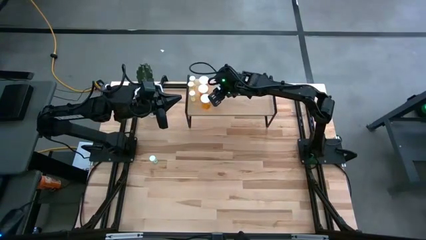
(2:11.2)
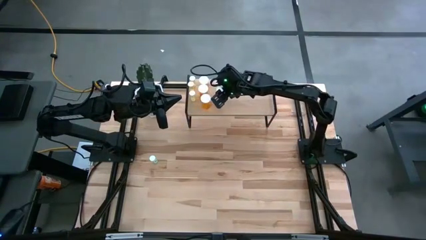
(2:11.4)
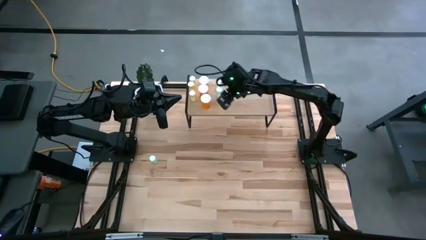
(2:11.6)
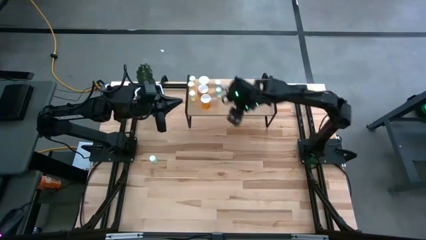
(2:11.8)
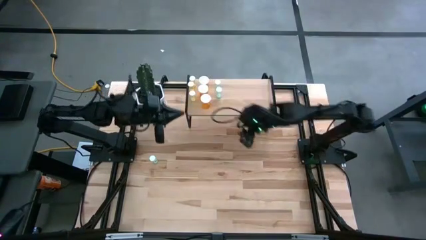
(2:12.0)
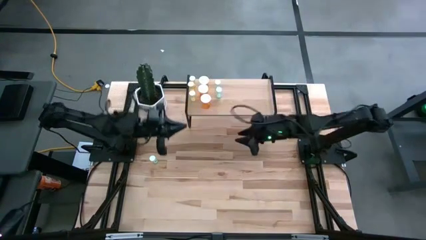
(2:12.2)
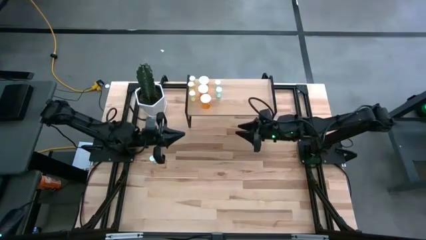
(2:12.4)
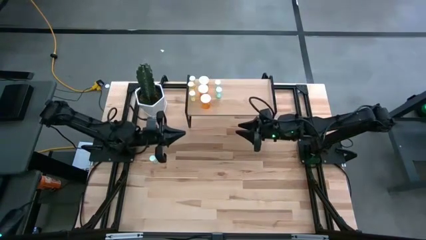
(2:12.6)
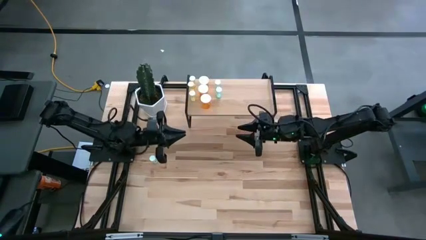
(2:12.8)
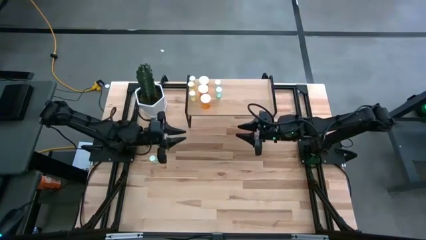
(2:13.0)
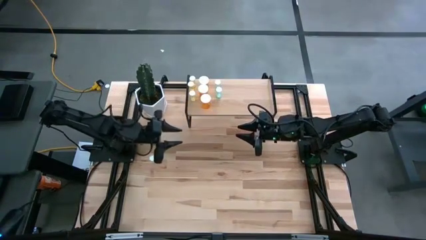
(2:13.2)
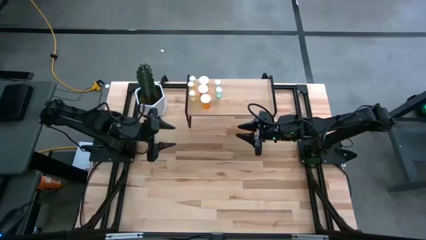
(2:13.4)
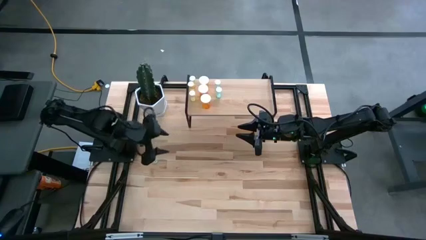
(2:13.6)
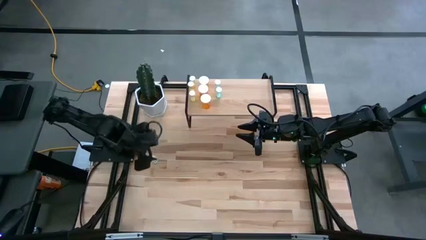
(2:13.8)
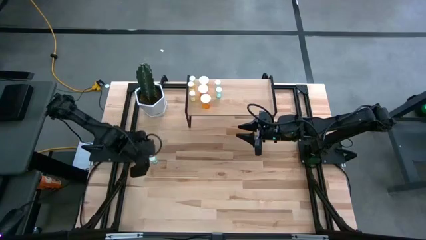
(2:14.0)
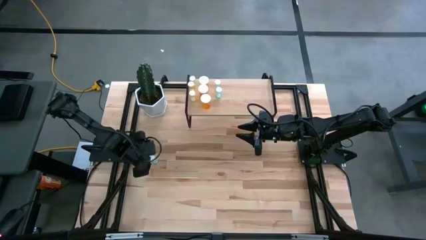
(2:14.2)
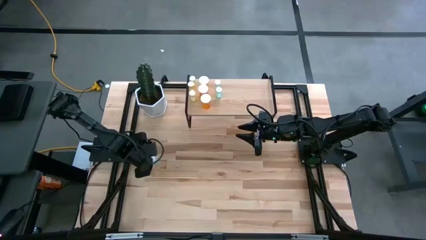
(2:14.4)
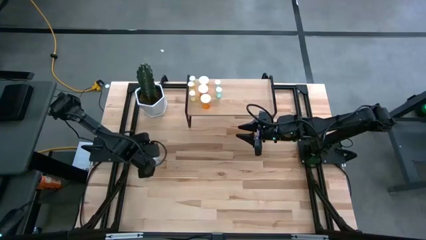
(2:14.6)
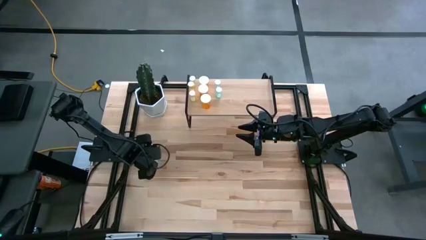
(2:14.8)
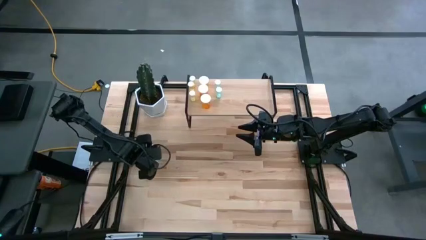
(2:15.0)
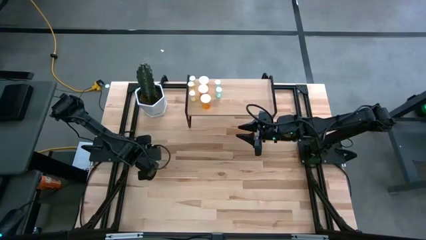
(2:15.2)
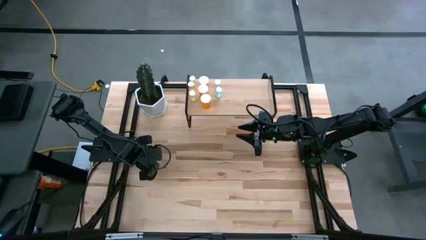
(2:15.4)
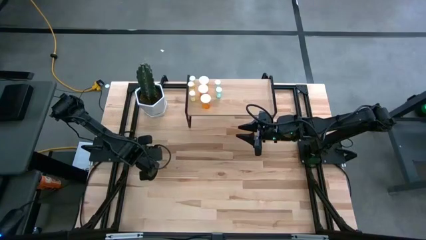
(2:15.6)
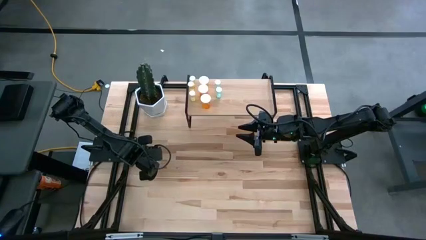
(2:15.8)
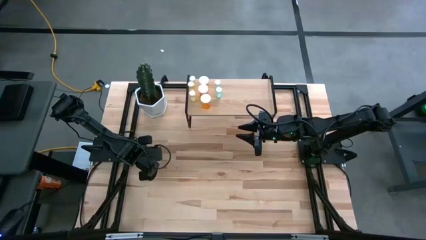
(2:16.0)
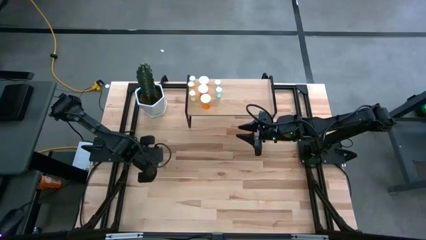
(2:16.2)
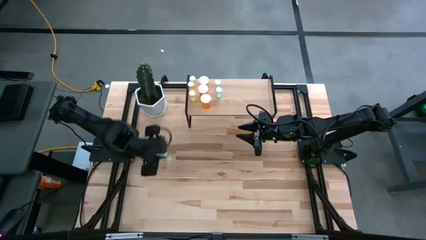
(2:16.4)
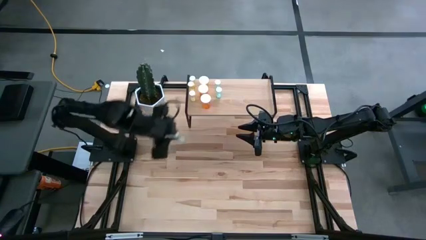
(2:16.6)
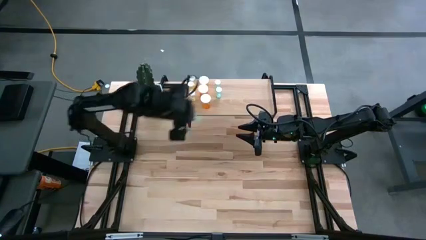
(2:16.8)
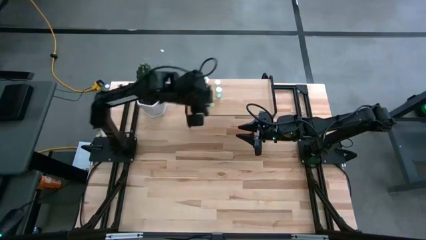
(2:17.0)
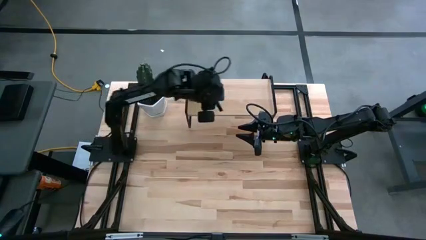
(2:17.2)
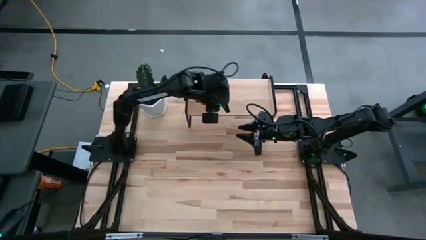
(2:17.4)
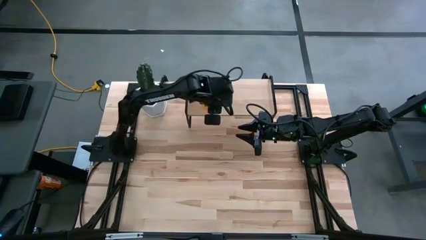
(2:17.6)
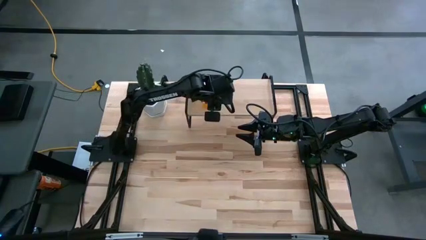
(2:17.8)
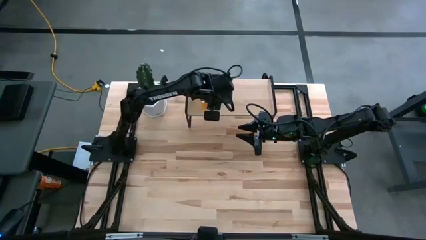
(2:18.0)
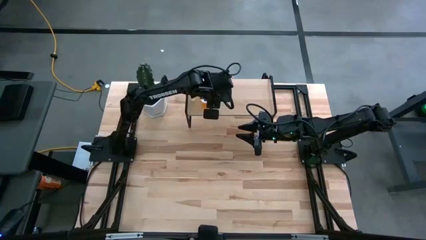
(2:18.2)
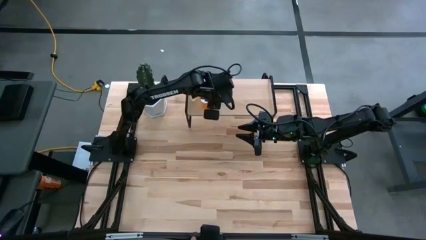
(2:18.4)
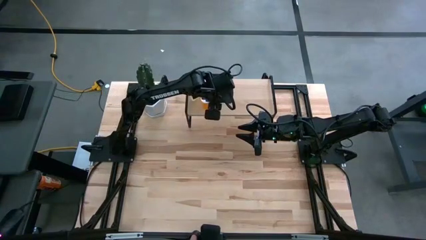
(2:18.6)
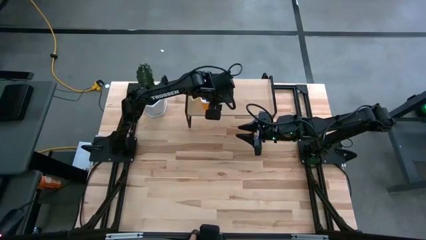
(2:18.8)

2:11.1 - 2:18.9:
Task: Pick and place medicine bottles onto shelf by color
Align the blue pill bottle with the other blue pill bottles on the shelf

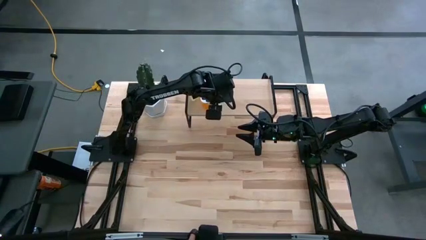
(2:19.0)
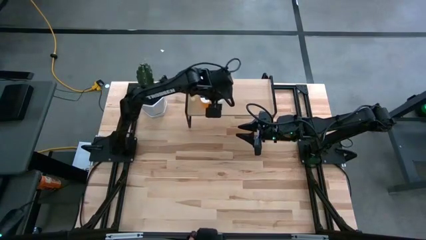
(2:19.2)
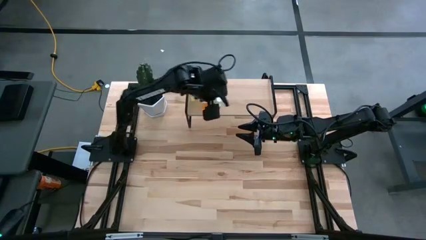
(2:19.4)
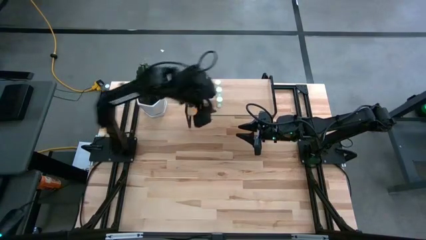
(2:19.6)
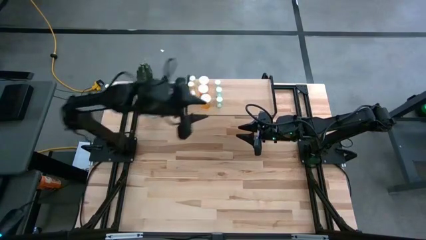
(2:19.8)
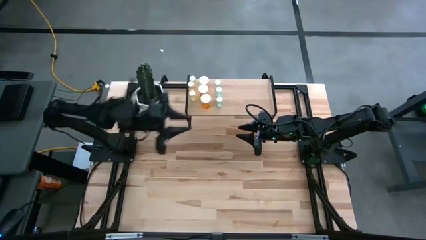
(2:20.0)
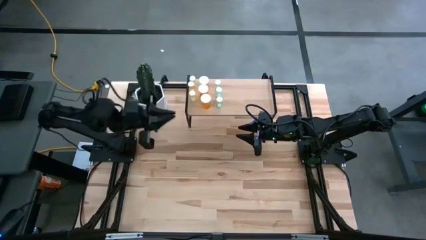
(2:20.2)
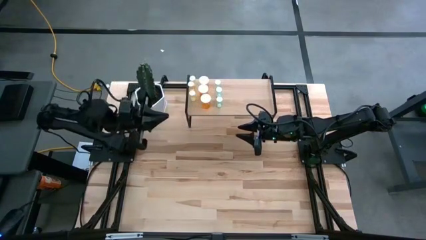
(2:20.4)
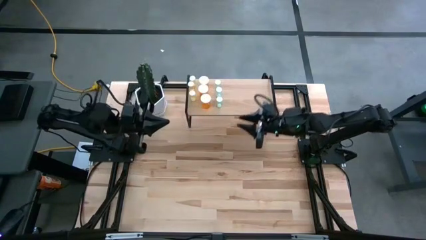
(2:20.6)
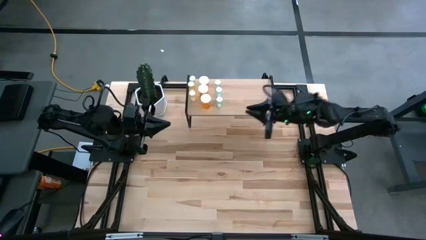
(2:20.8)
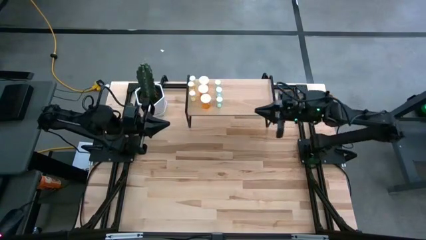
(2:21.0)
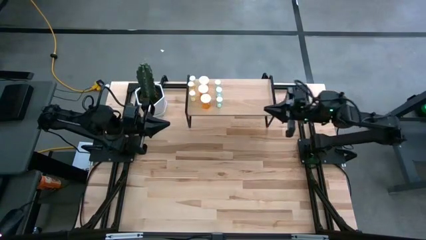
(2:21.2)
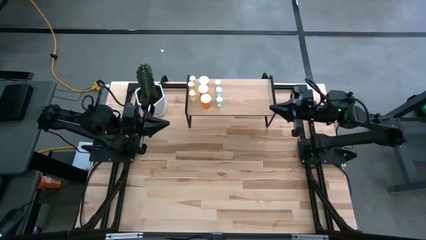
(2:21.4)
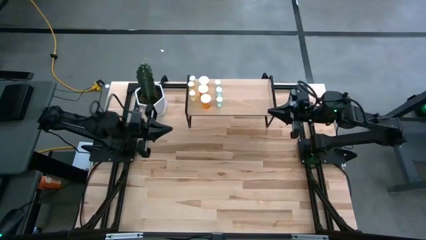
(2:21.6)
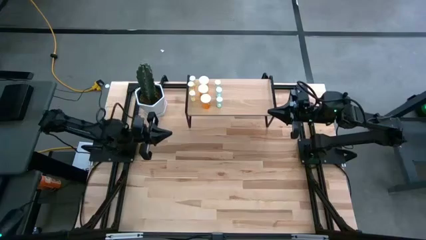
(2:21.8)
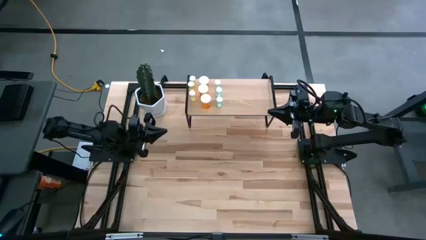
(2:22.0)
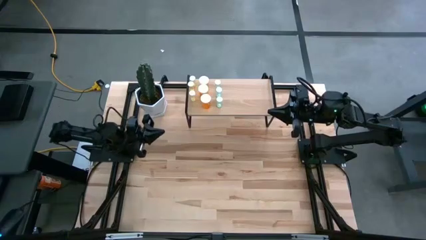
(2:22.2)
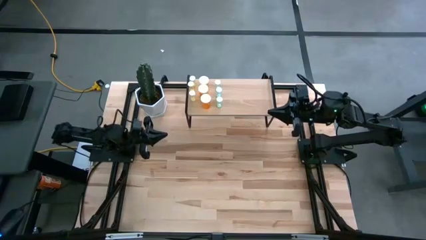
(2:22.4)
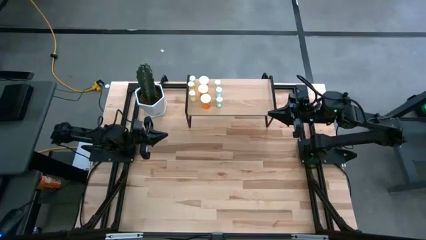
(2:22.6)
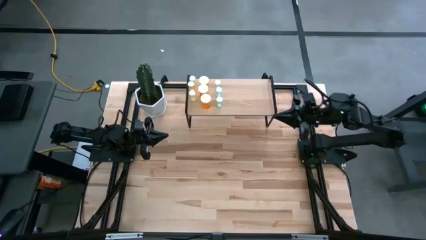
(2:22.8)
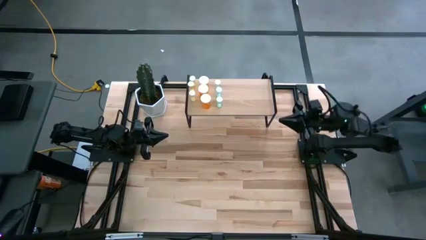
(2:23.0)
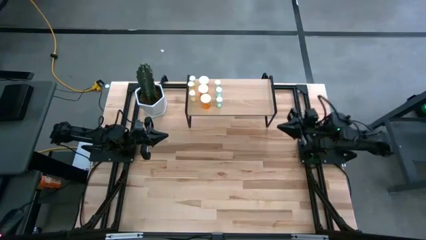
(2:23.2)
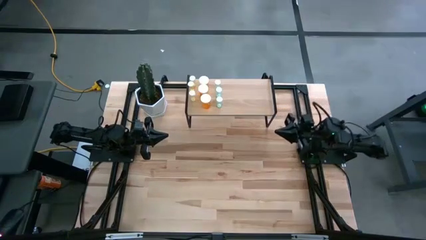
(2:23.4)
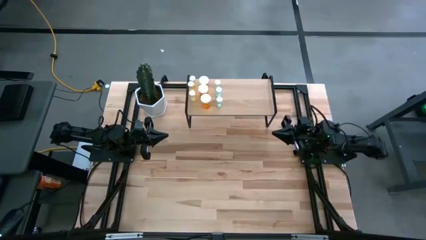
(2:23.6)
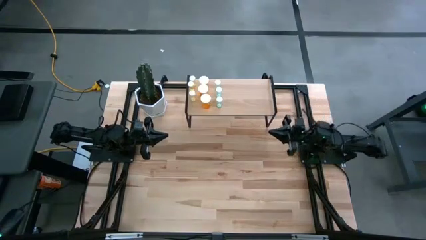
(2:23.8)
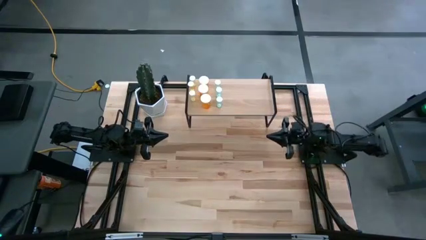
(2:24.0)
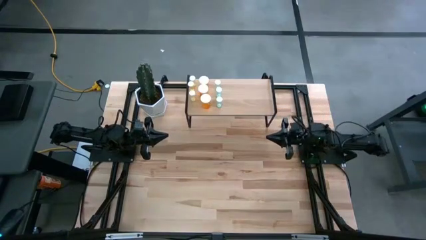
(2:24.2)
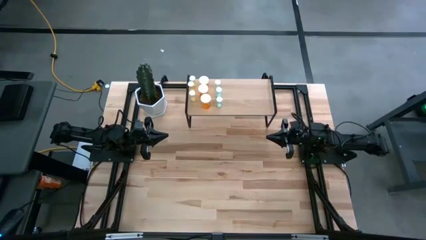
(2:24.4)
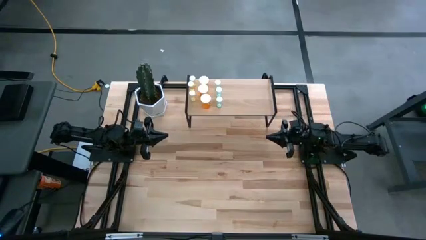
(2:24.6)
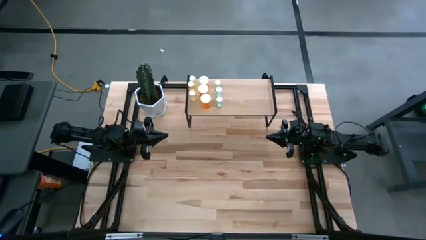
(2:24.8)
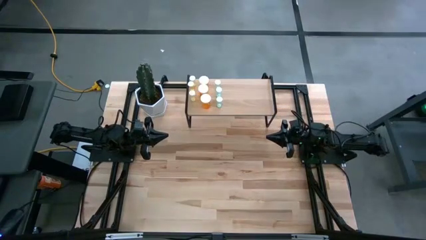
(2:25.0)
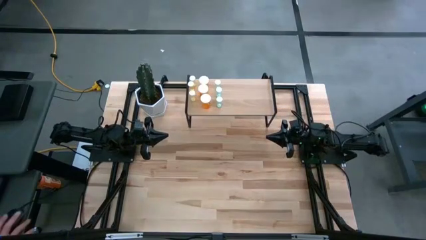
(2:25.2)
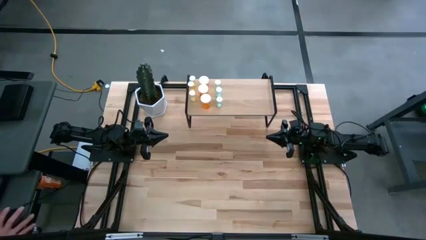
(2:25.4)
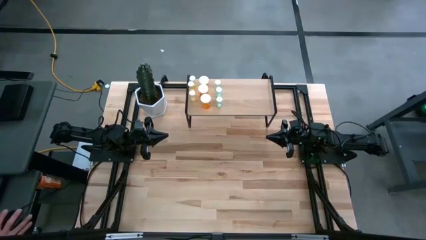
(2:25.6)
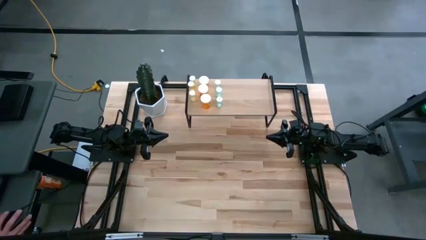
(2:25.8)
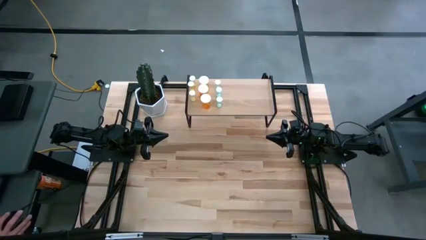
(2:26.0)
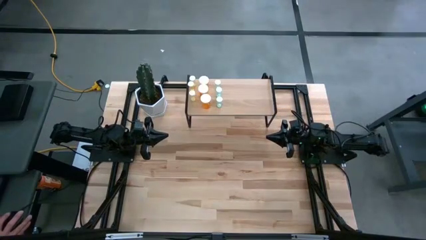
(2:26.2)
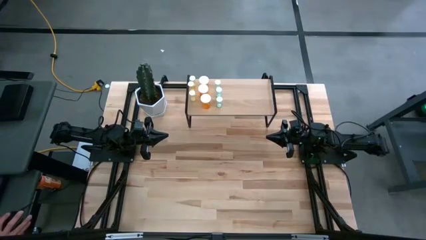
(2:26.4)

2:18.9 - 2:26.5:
Return to Home Position

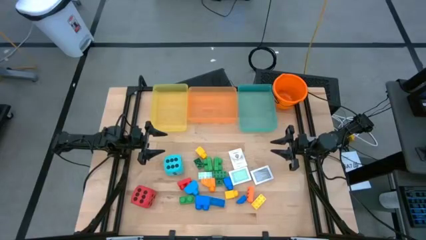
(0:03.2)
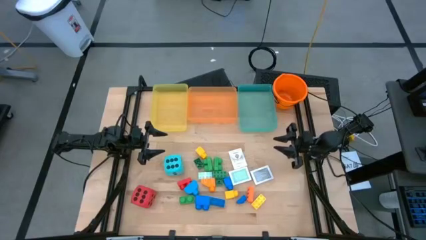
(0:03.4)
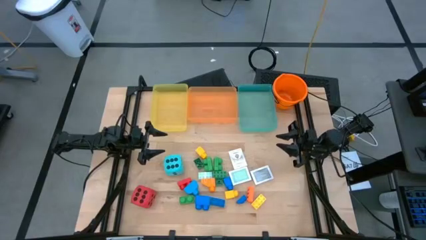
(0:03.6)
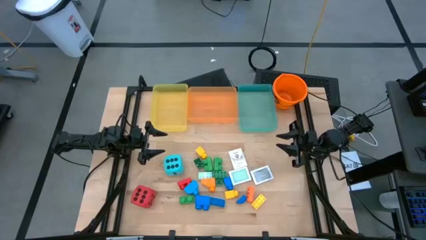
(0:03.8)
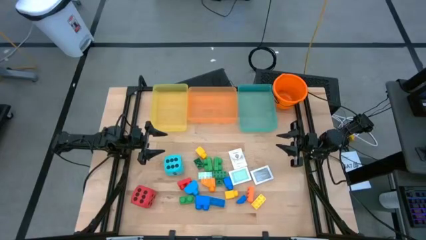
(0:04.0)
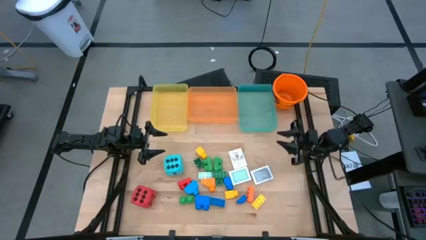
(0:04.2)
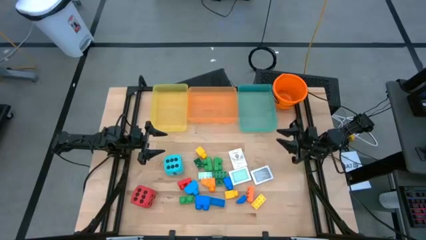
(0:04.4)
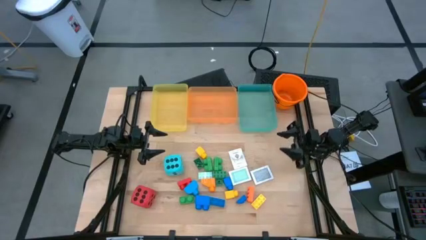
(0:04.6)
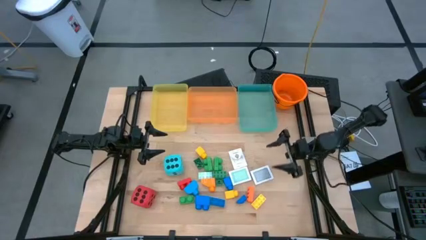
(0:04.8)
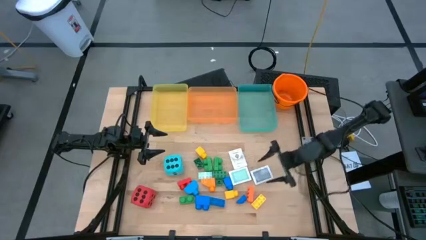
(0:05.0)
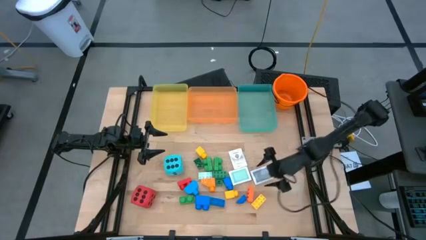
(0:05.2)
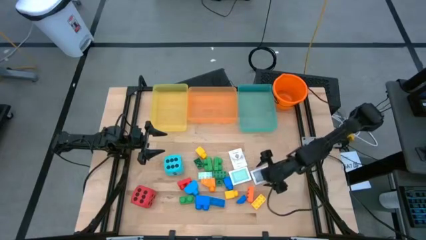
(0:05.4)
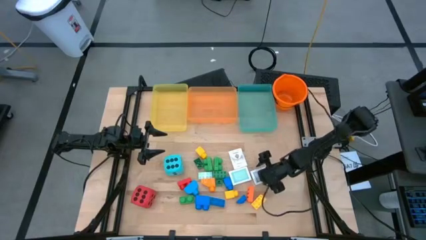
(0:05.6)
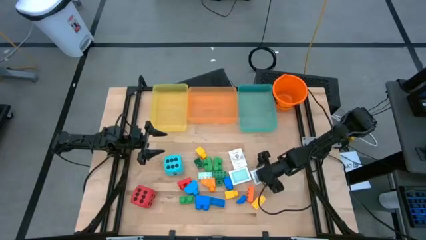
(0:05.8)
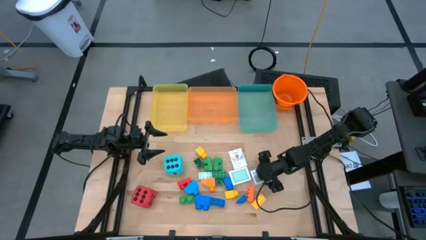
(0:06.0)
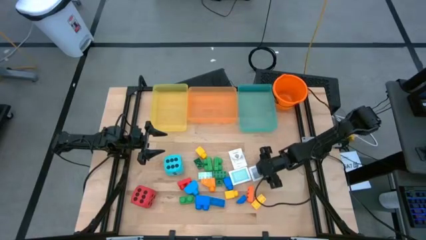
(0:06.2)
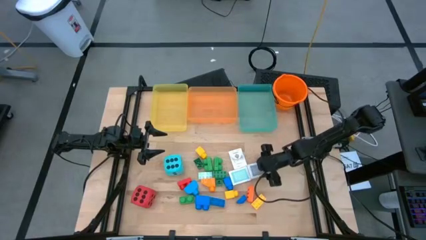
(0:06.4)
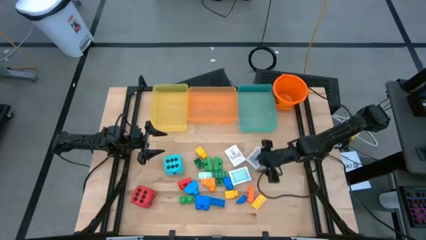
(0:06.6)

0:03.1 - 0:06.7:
Task: Pick & Place Toys
Put the gray game card into the green bin
